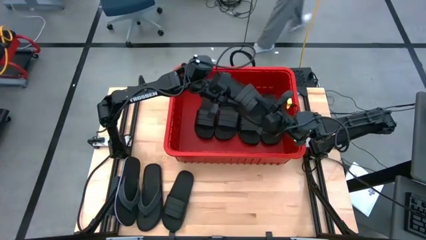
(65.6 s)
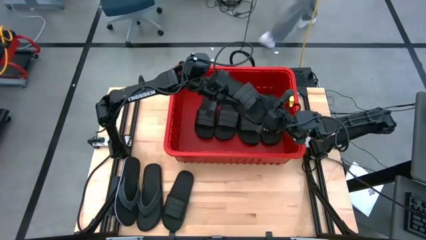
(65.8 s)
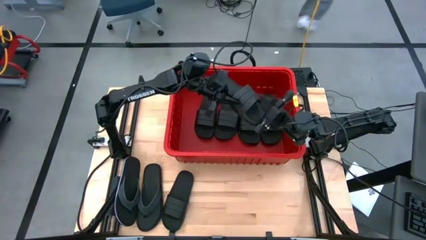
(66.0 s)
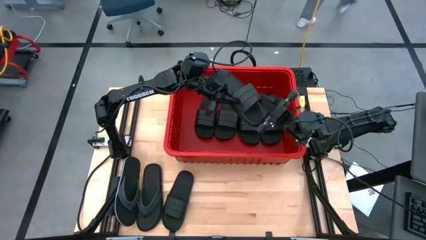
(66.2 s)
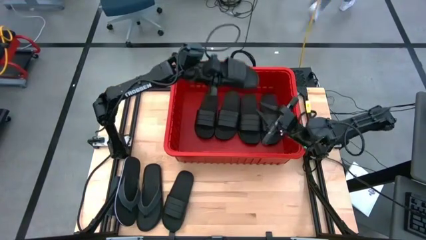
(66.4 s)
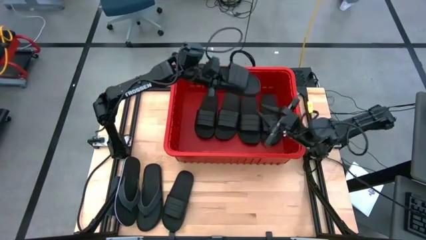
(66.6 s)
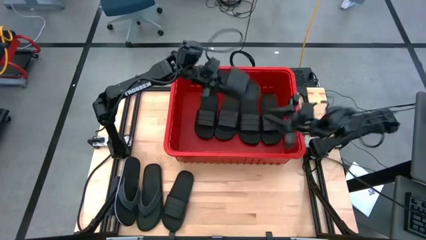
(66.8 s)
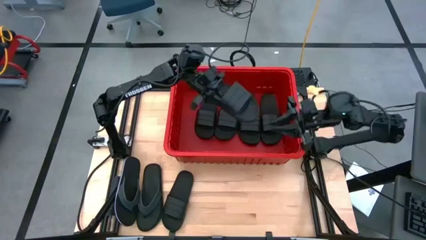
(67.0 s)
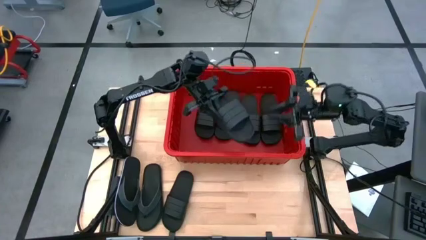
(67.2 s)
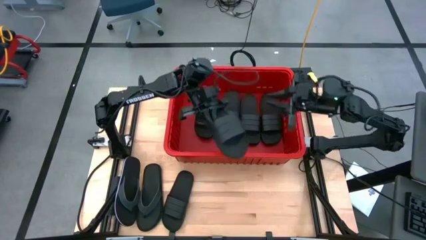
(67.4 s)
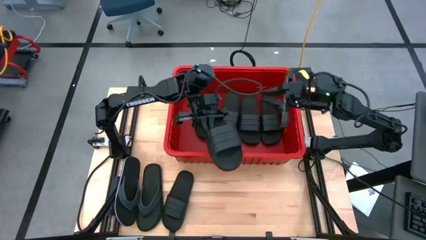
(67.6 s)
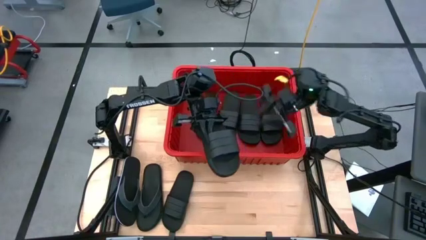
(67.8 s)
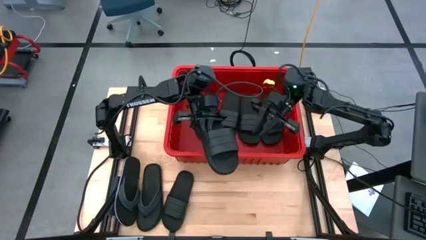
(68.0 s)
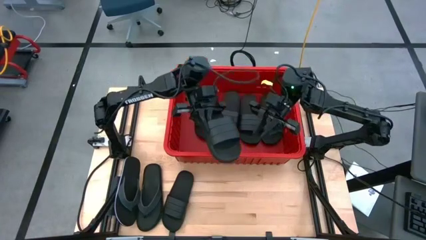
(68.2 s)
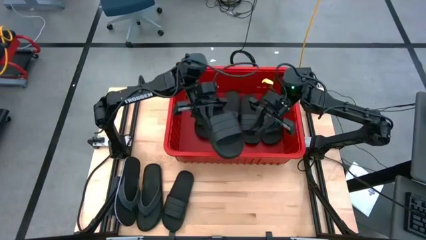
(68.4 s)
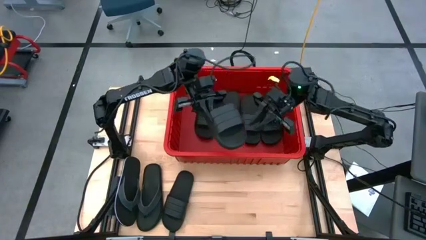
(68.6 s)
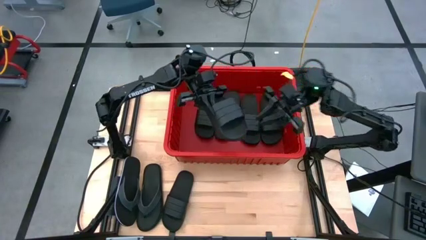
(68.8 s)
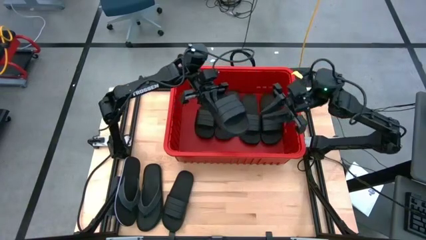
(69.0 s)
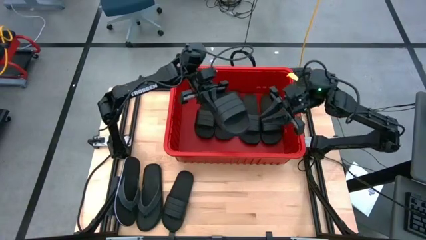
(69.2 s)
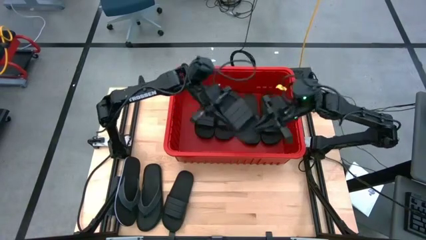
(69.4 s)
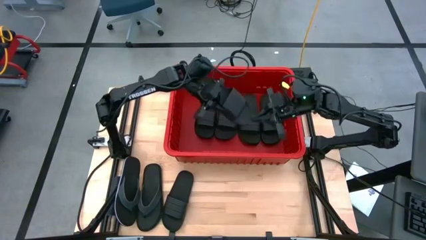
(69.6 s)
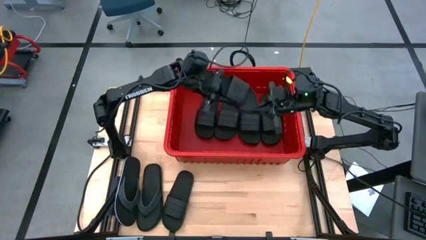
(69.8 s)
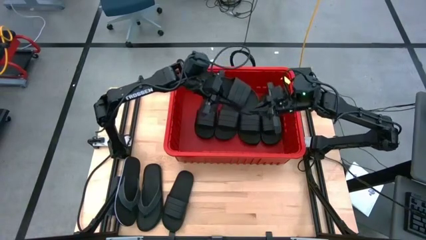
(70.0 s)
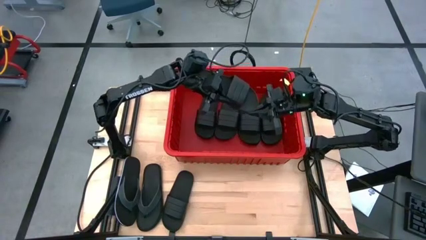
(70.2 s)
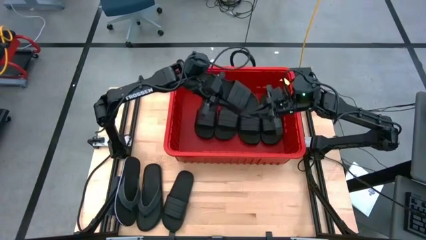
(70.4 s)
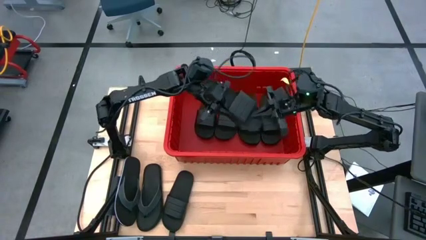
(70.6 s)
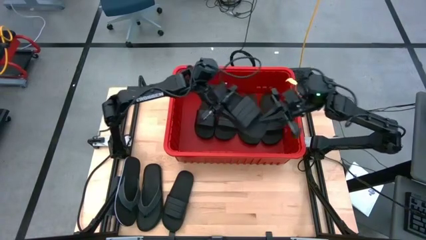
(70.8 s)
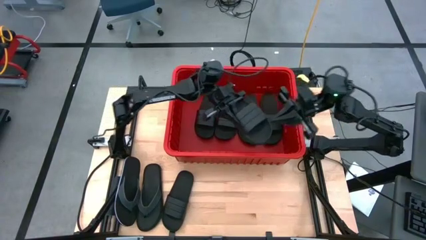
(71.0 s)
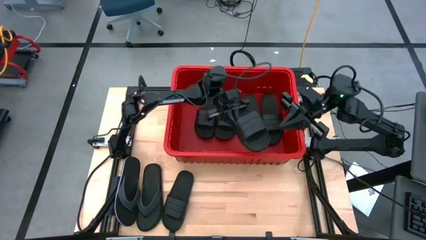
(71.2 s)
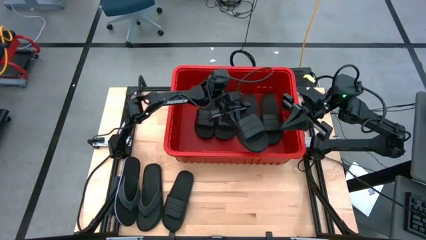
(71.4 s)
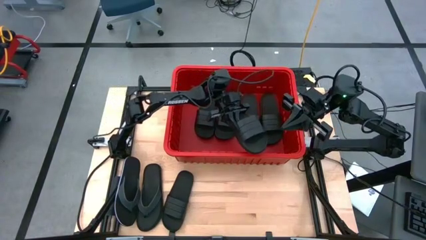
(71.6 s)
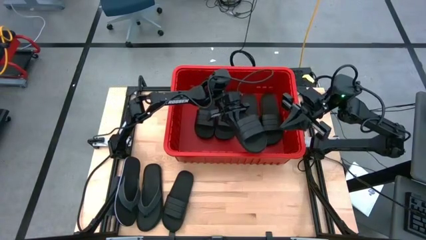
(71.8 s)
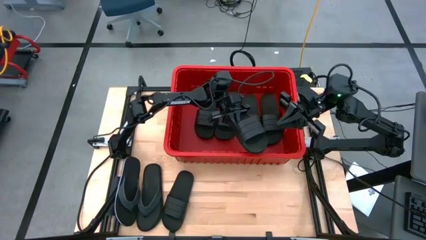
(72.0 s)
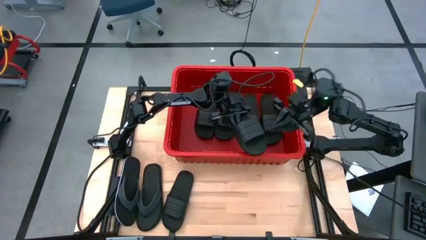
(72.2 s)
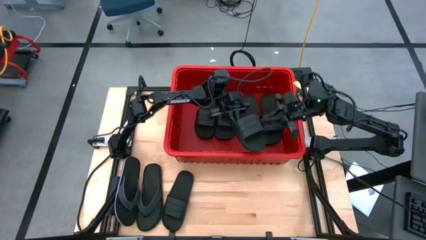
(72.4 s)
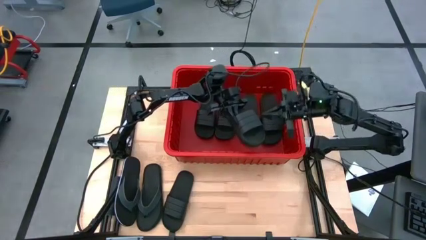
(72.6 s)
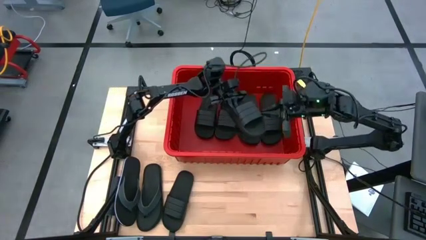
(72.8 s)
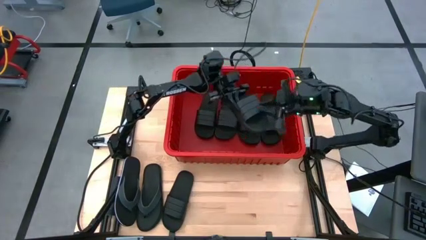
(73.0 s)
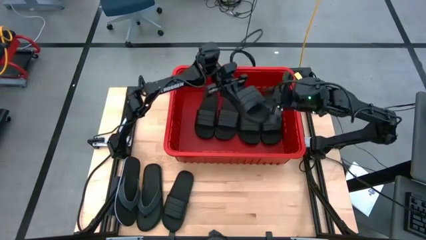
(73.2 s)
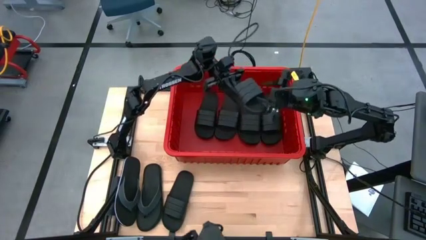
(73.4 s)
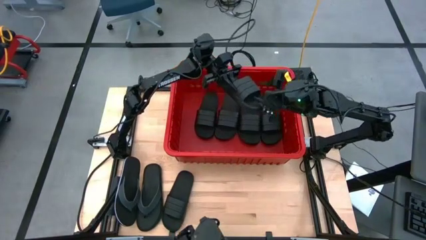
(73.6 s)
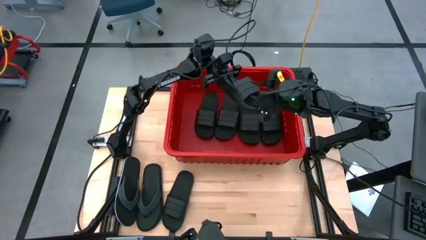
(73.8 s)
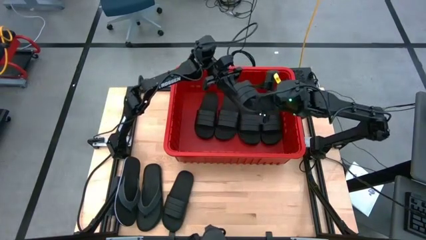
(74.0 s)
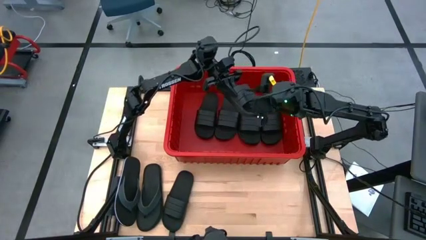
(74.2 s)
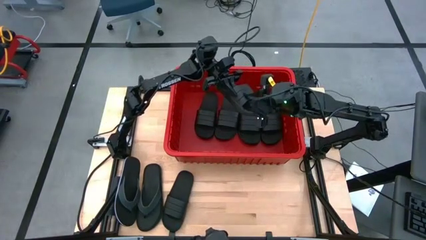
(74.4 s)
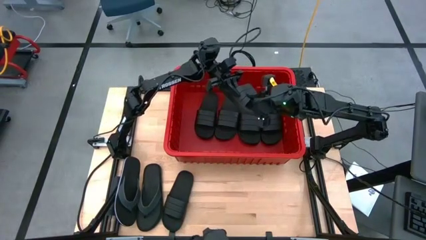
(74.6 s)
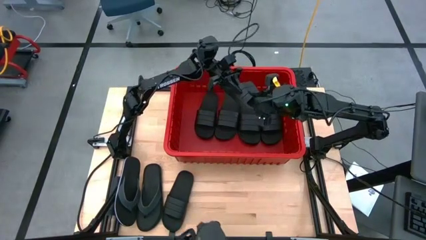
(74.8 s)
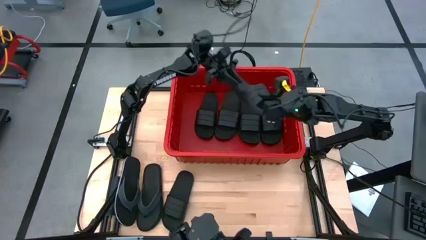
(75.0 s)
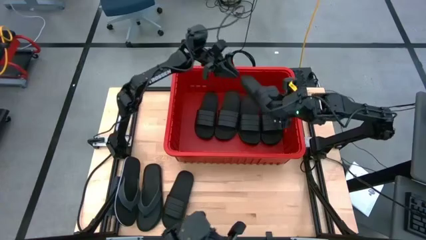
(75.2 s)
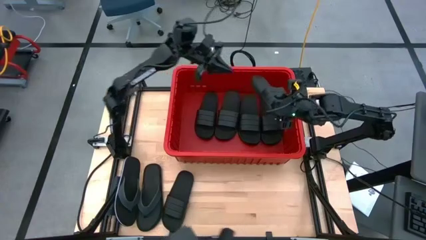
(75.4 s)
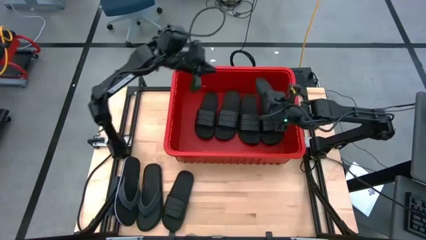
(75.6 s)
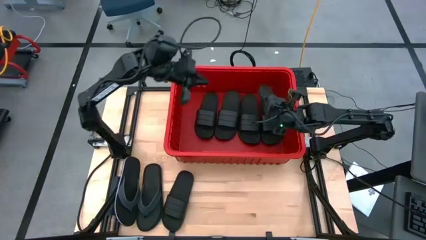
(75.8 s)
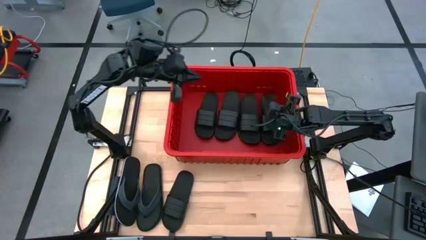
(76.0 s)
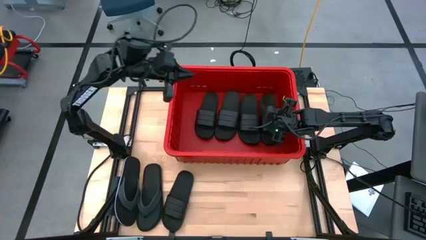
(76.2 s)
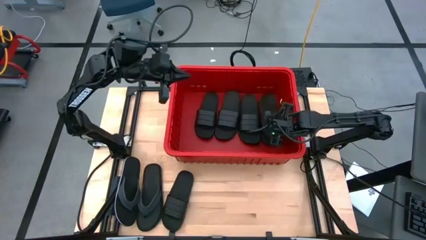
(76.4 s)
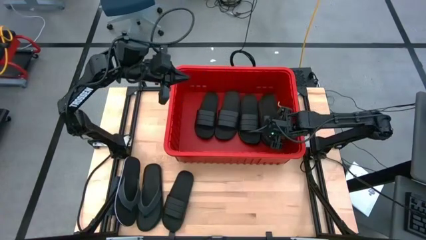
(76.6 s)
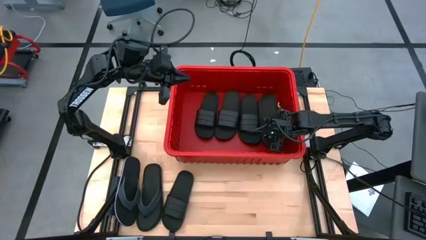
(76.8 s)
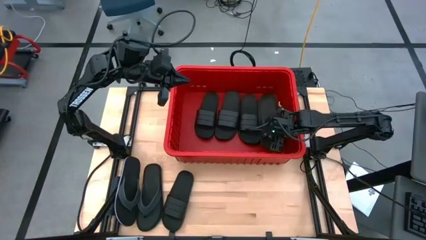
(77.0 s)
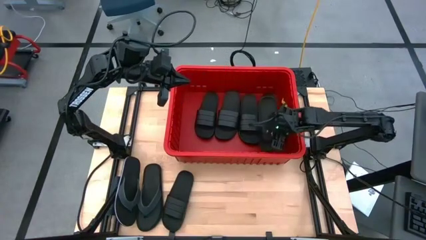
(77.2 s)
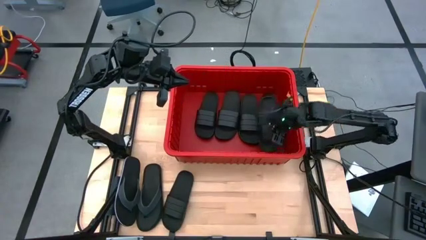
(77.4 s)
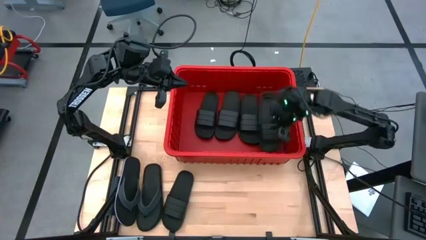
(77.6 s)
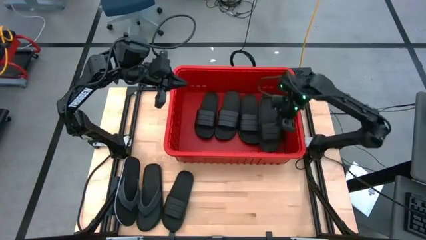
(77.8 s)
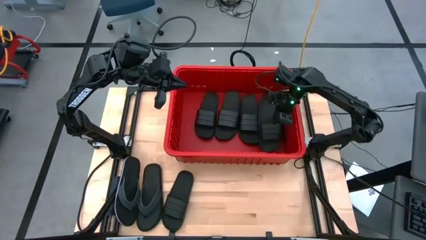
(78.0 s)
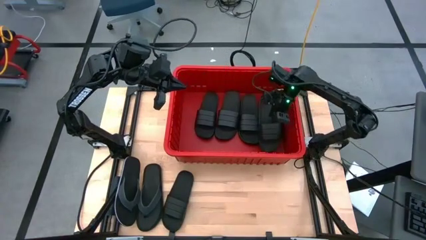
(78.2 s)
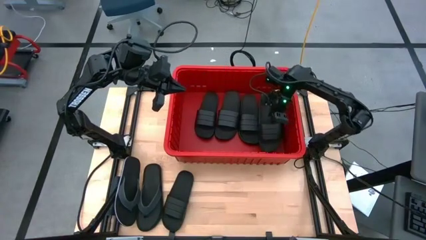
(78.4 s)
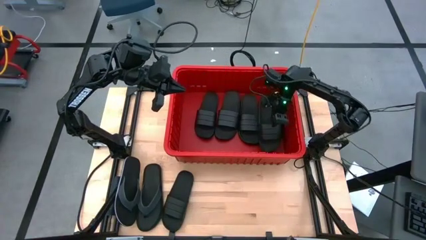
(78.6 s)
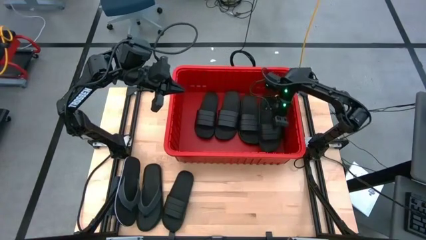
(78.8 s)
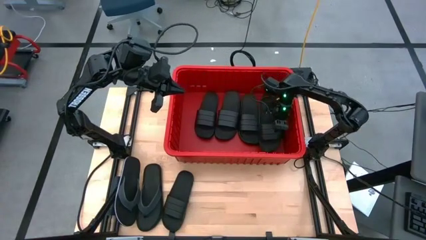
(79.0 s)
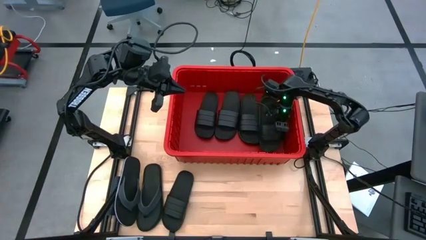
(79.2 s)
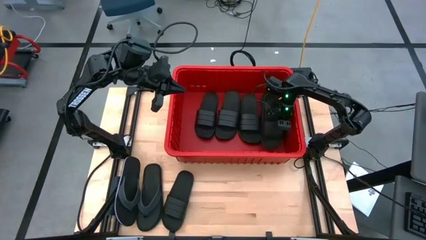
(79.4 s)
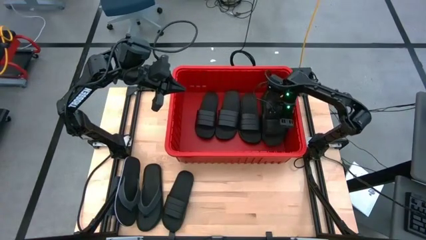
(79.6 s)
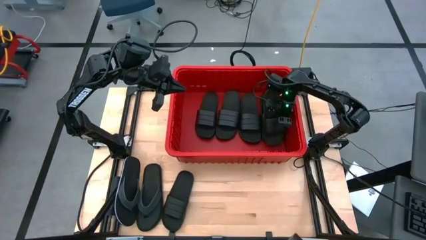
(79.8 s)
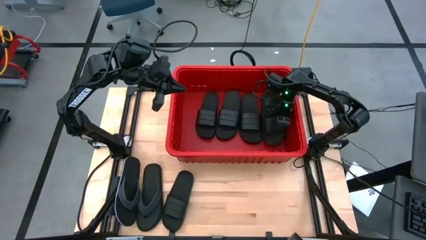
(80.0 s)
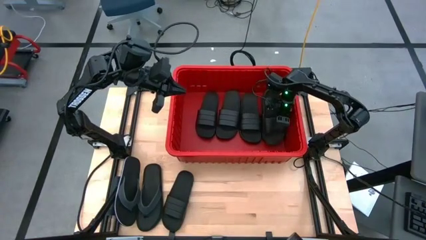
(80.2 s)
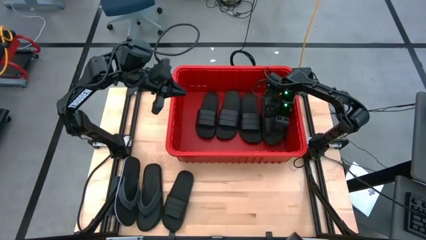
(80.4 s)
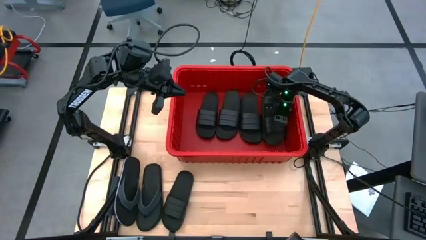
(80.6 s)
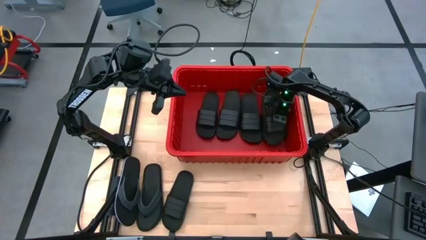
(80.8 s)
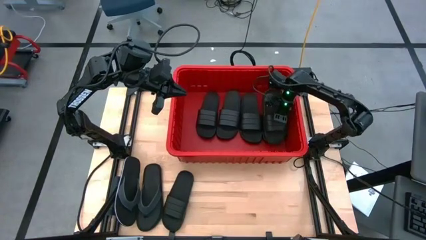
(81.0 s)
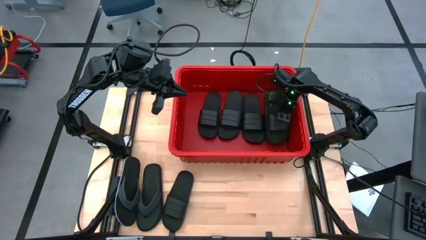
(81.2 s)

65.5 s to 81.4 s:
Task: Pick and place slides into bin
Put the right black slide on top of the other black slide into the red bin
